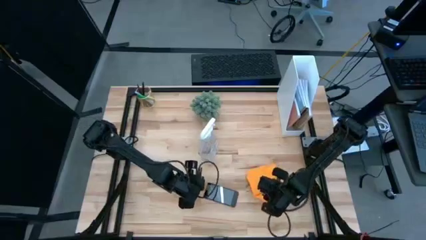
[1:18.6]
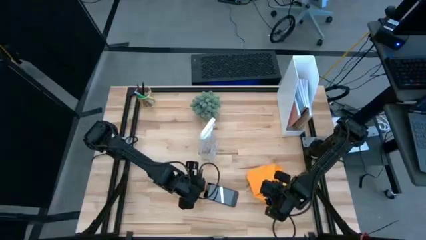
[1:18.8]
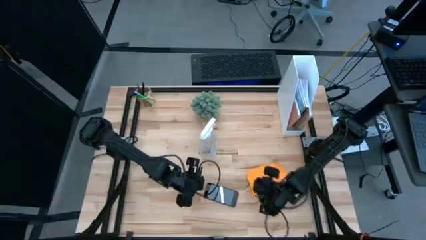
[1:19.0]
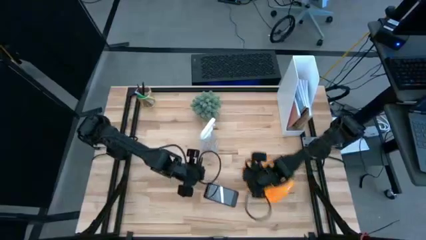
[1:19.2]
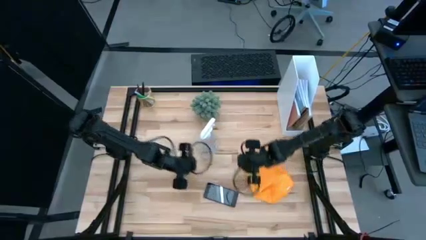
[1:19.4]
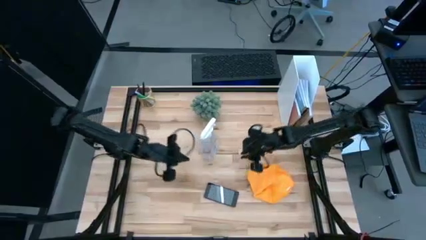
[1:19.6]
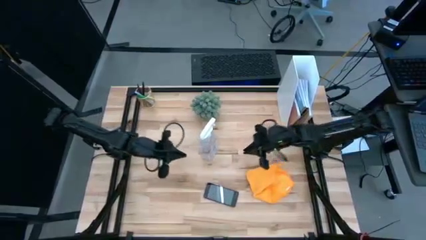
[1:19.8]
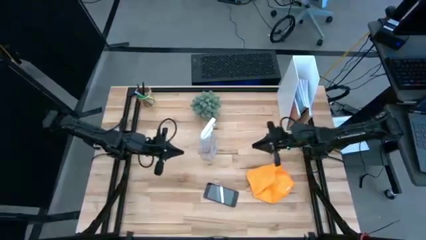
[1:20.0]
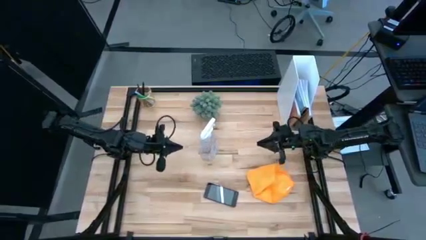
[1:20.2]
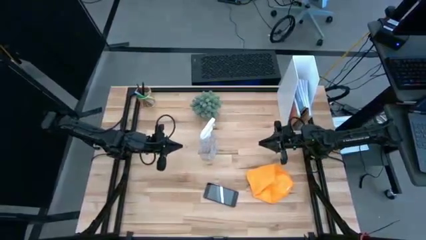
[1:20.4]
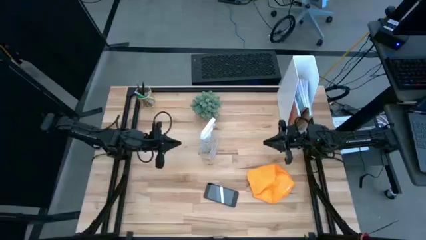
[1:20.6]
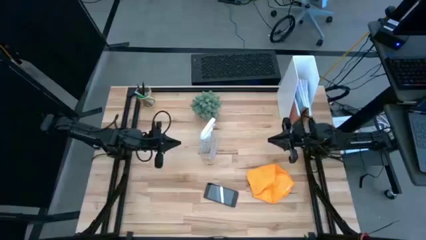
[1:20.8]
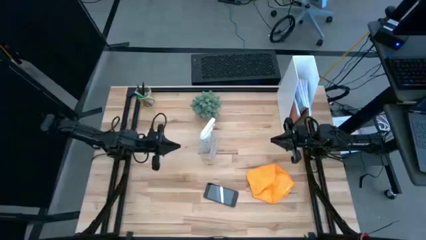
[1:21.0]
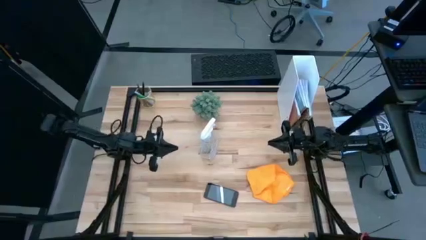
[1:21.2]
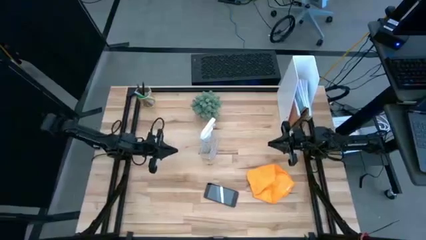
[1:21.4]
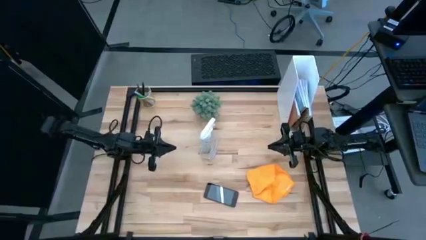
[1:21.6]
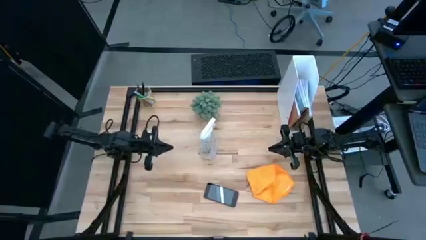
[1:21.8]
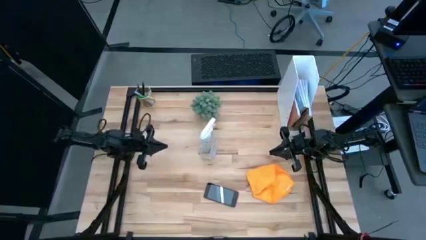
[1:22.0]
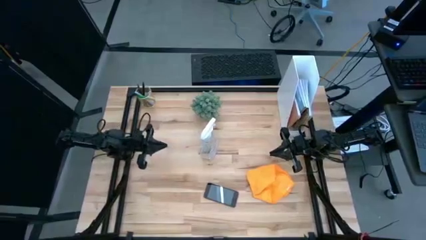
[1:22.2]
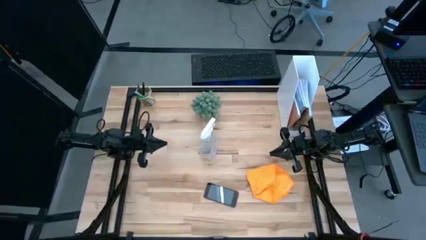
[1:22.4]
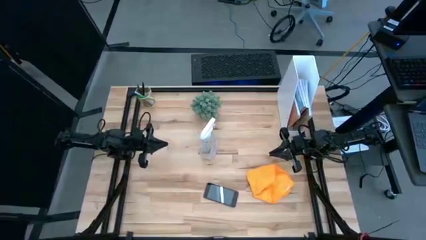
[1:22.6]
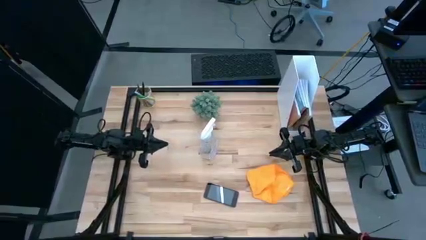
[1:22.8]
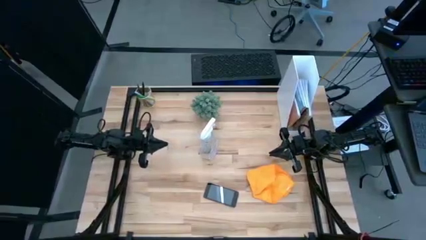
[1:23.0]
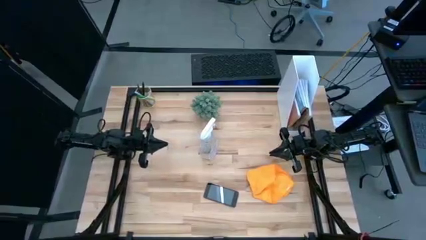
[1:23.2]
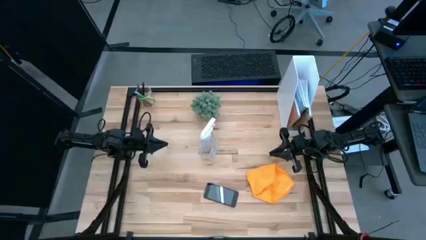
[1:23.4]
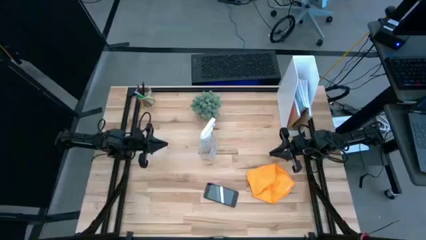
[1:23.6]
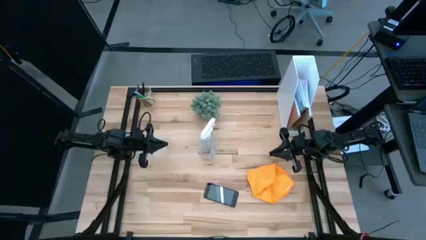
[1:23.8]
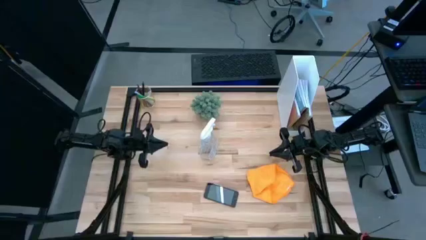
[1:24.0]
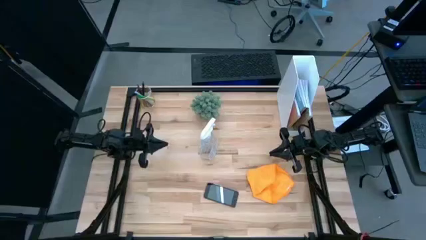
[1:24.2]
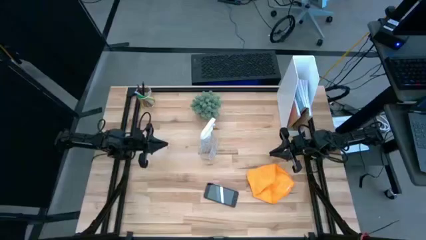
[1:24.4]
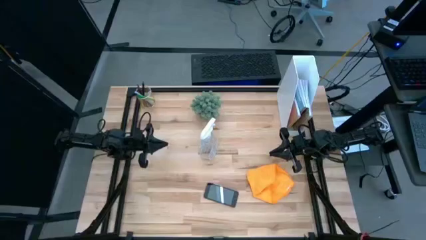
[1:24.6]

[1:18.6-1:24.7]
Task: Apply microfiber cloth
Return to Home Position

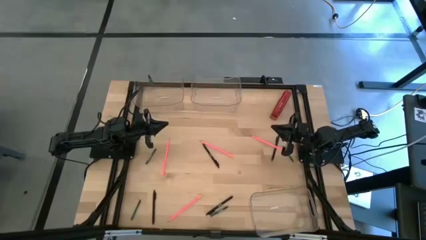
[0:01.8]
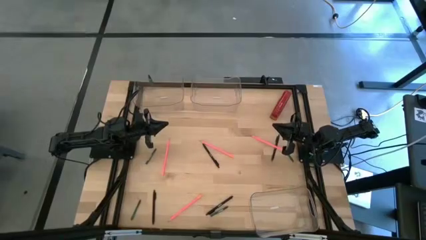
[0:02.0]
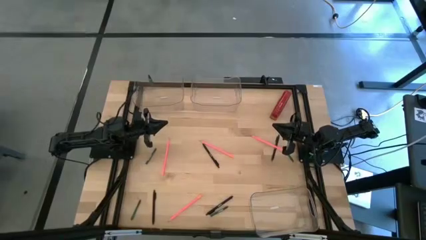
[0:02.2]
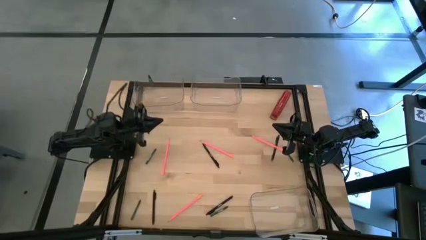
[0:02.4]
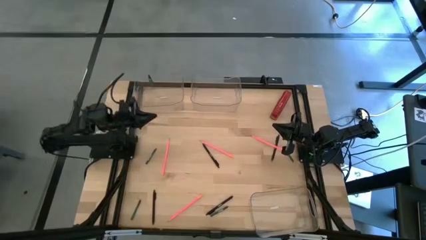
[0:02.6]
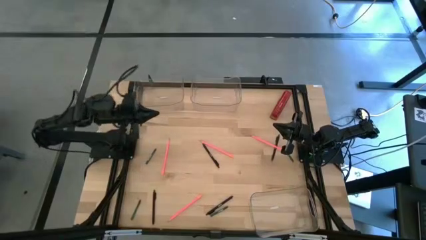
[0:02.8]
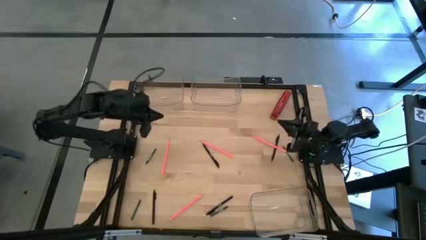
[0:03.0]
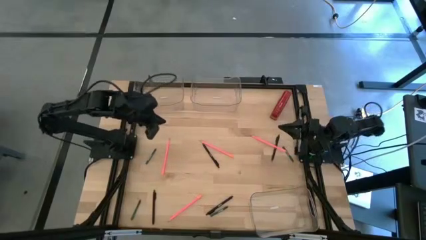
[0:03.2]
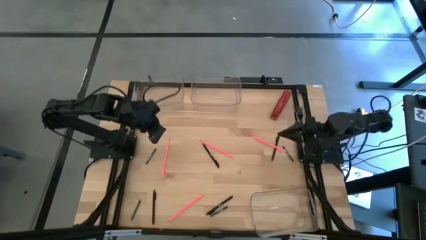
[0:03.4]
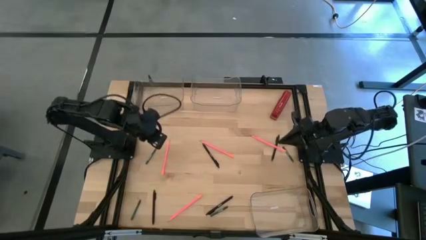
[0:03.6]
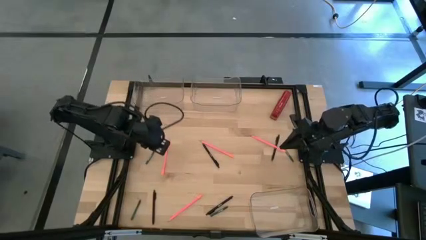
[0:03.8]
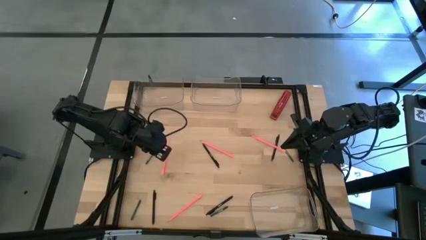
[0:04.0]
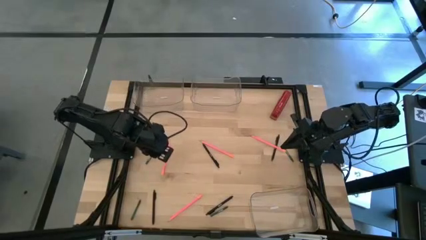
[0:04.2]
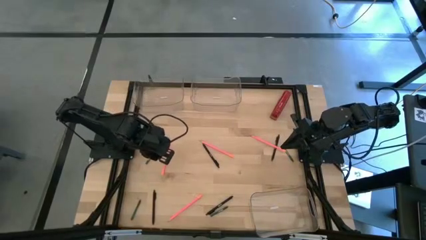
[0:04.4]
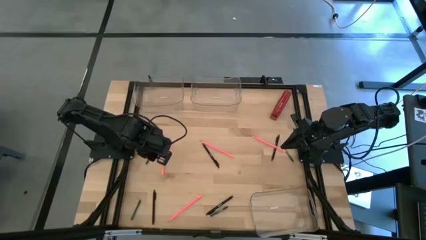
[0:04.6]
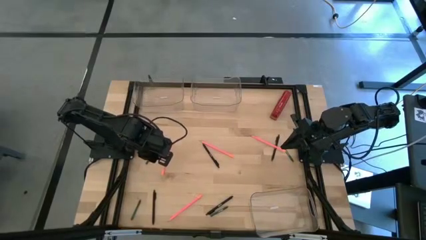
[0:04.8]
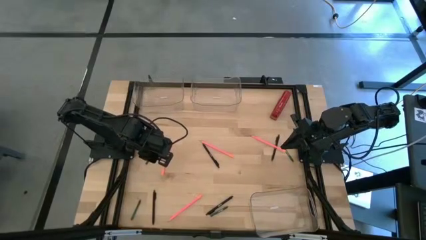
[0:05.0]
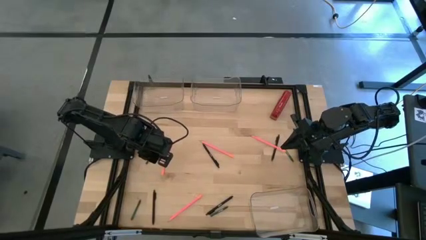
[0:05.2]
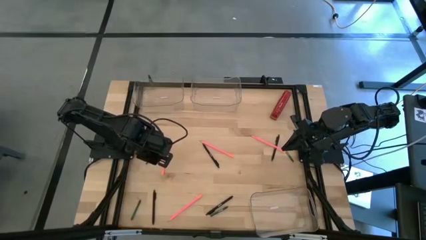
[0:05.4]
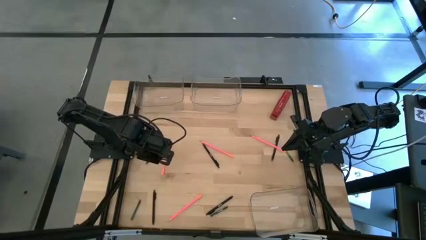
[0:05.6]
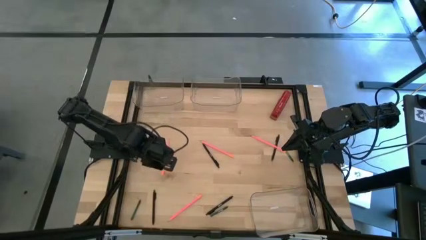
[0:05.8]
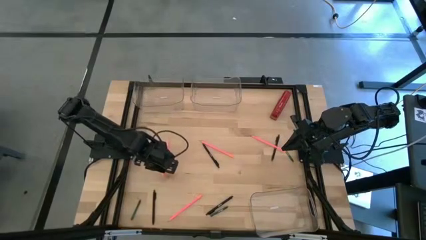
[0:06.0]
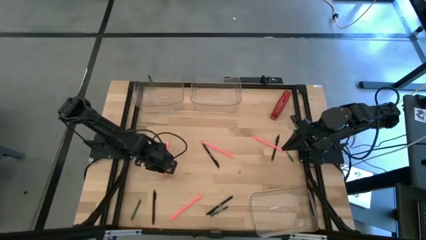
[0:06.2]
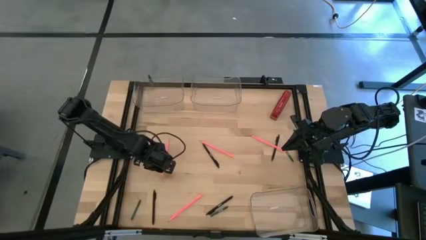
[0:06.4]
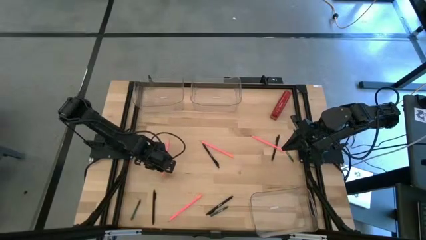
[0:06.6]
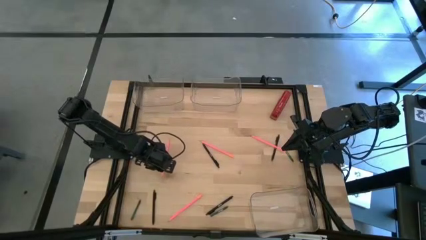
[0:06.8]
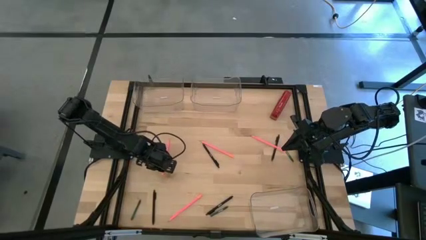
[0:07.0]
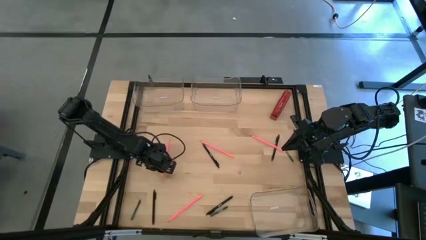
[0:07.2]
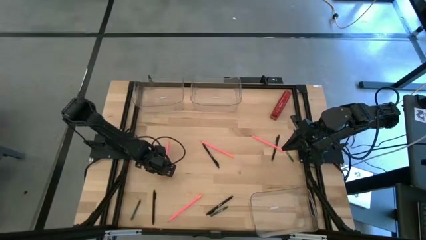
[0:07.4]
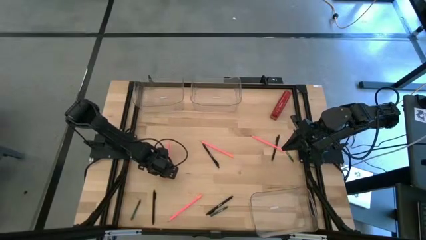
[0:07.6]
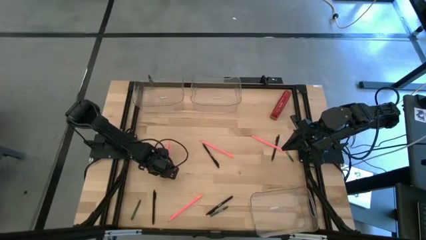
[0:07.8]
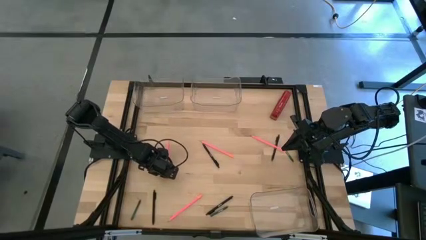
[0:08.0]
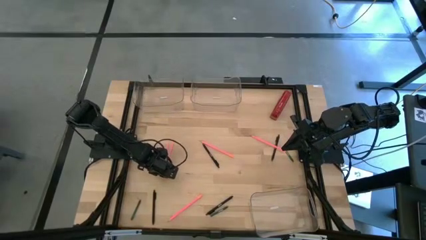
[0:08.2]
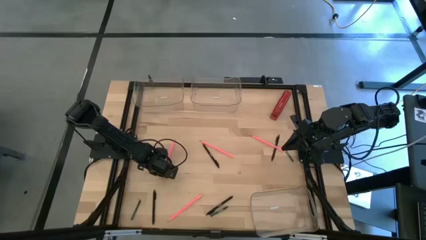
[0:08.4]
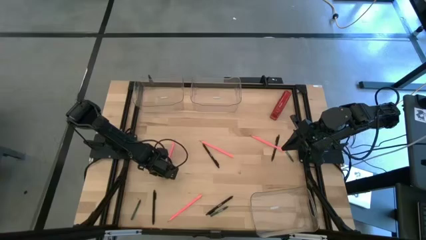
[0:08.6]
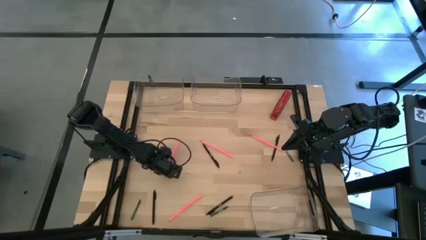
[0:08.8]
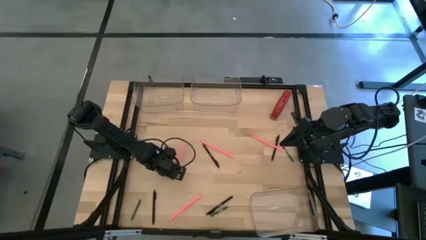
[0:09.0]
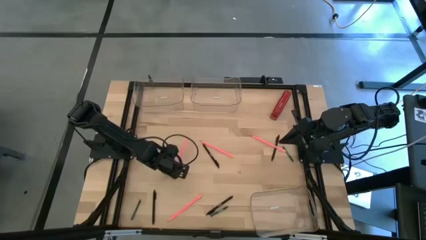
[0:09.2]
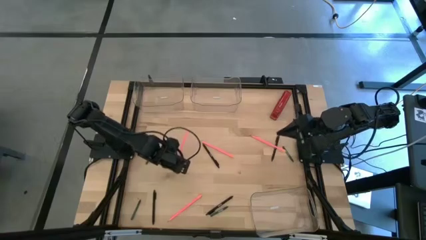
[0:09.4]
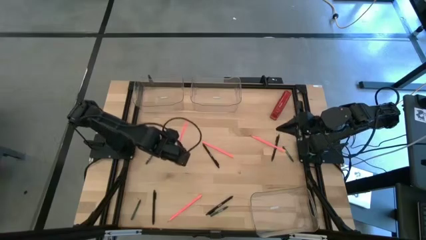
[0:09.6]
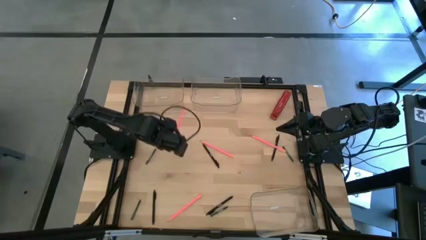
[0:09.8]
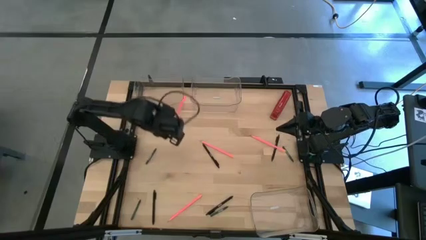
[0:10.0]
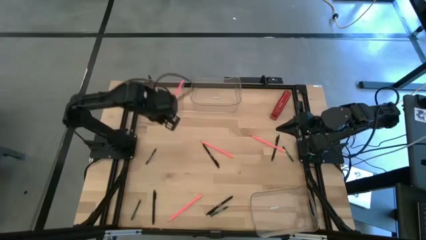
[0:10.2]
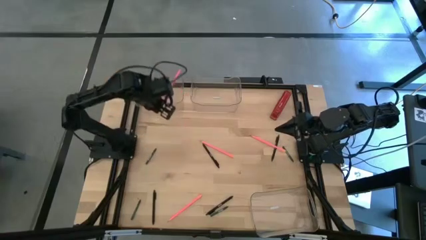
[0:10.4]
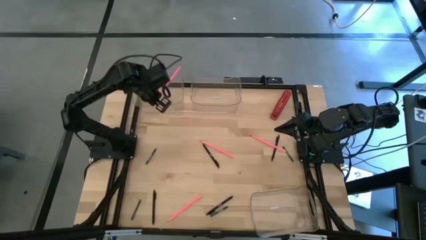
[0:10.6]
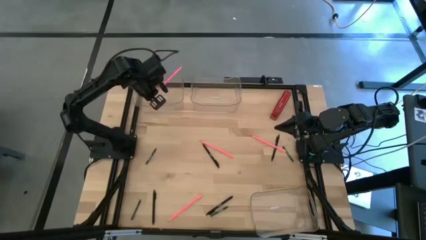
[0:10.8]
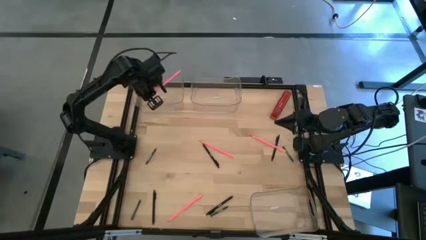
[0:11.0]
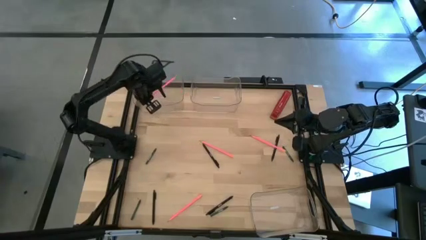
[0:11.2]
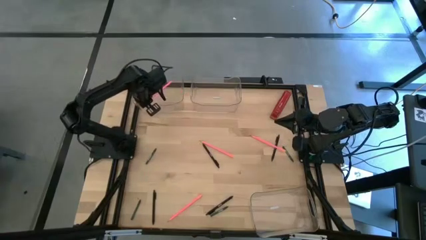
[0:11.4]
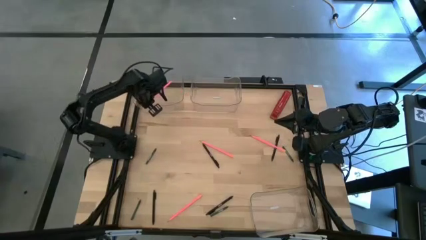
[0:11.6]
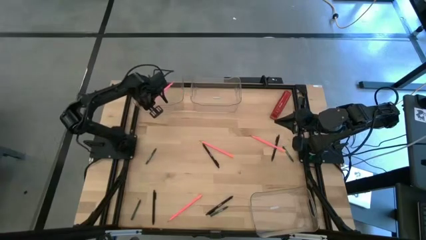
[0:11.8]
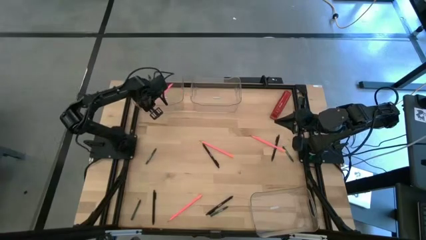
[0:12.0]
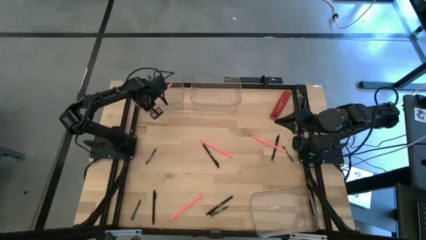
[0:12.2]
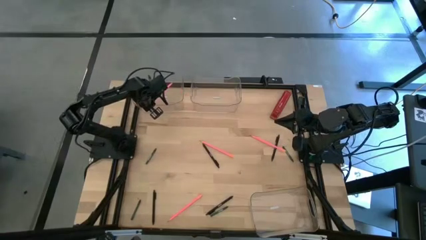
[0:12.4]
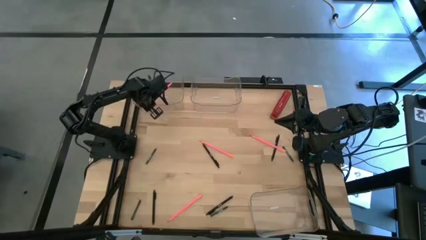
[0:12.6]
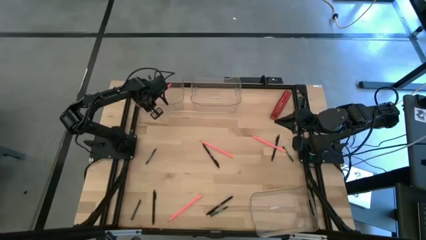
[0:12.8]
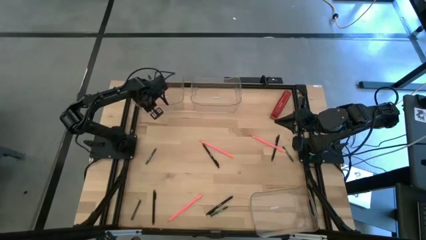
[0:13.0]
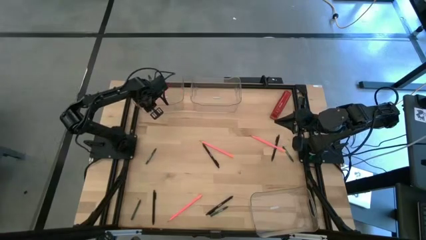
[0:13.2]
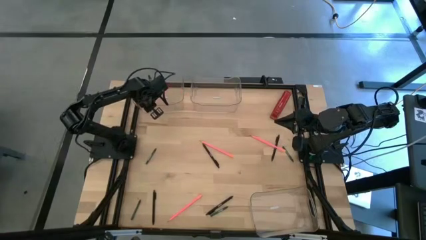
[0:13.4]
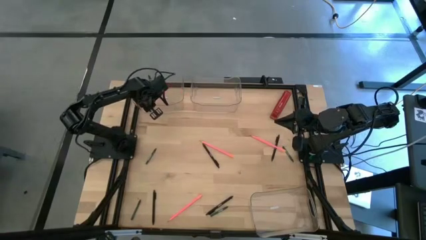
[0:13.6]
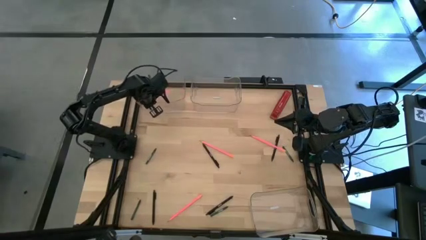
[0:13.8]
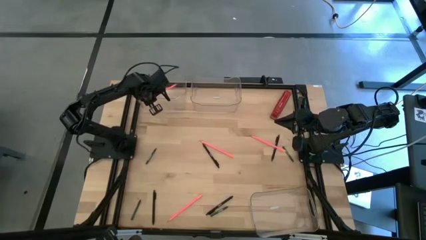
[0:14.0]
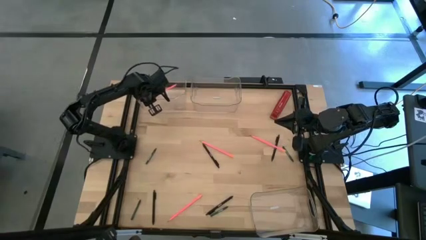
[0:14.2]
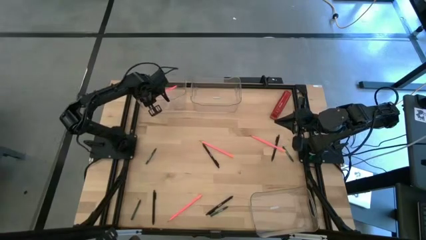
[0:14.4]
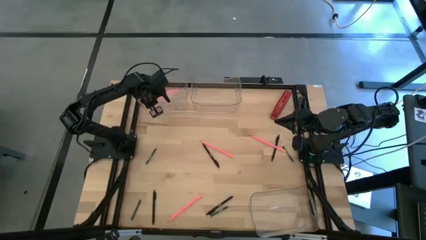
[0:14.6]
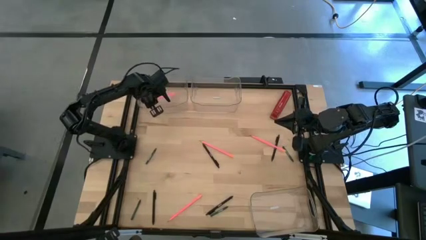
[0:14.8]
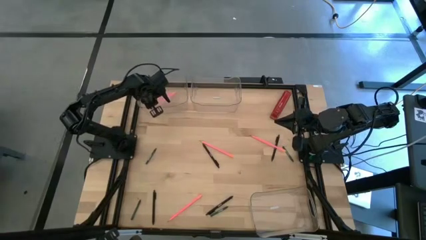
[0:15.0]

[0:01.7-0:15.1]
Task: Sort crayons/erasers/pens/pencils in bins
Put the pink pencil into the top left transparent bin
